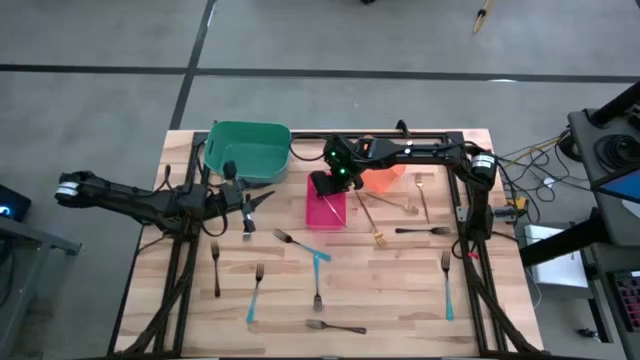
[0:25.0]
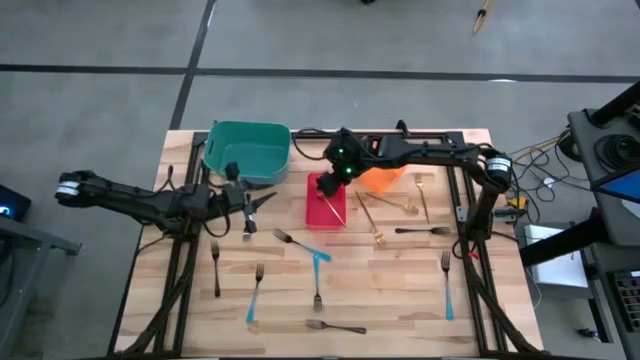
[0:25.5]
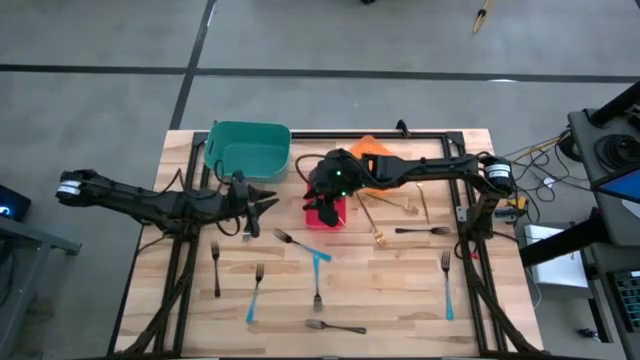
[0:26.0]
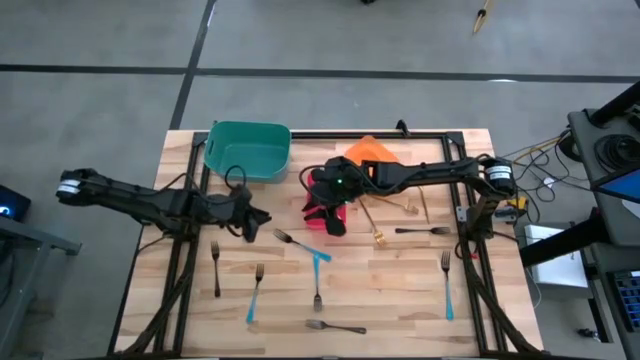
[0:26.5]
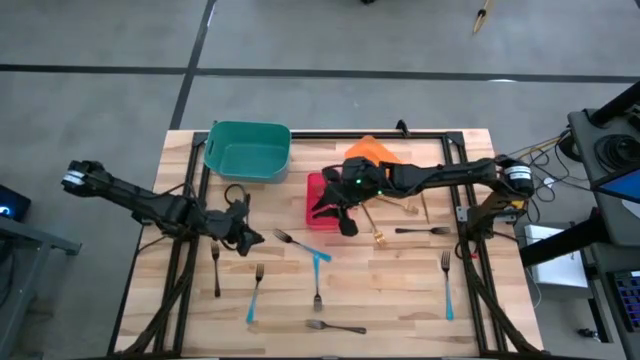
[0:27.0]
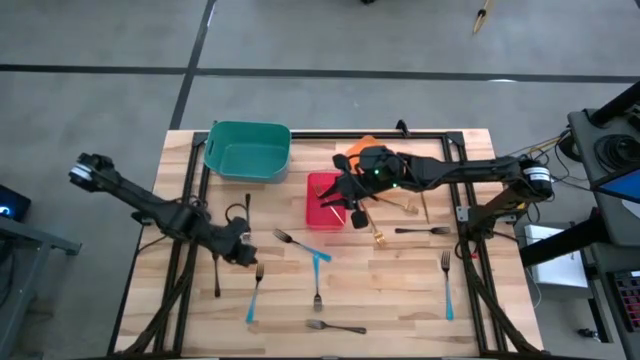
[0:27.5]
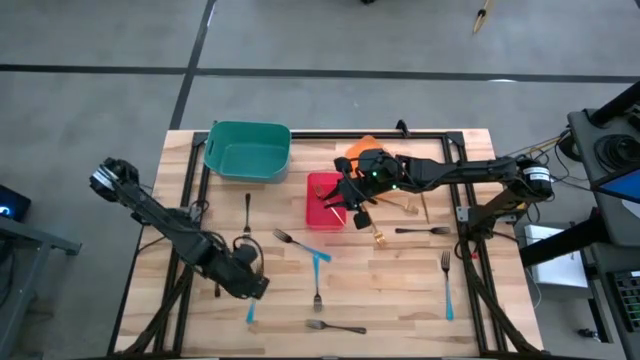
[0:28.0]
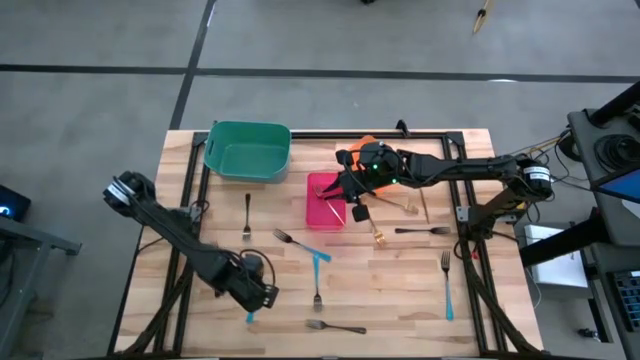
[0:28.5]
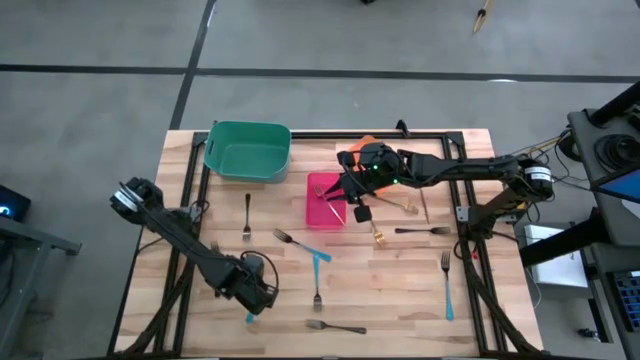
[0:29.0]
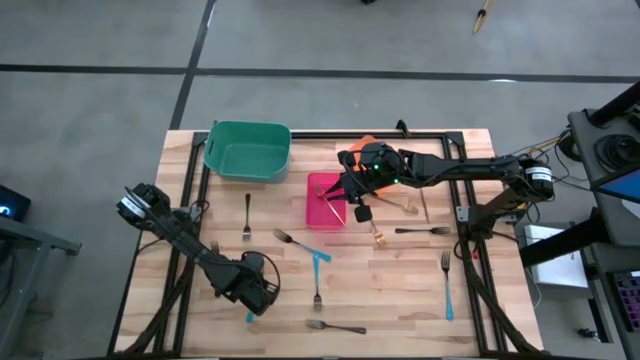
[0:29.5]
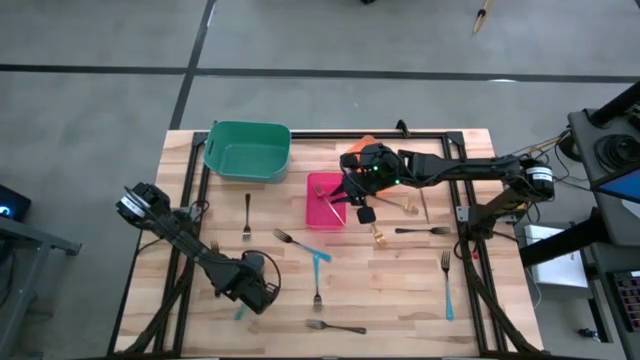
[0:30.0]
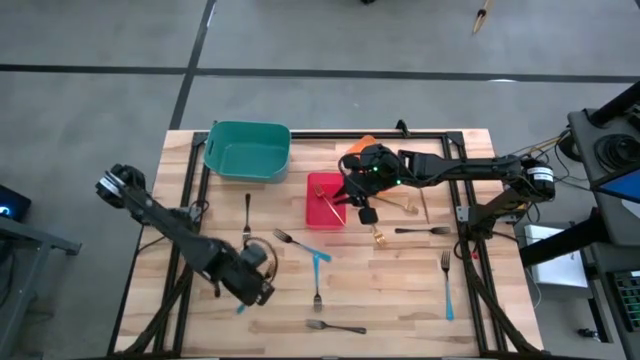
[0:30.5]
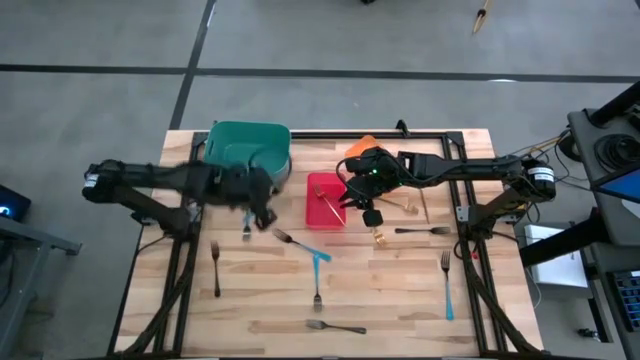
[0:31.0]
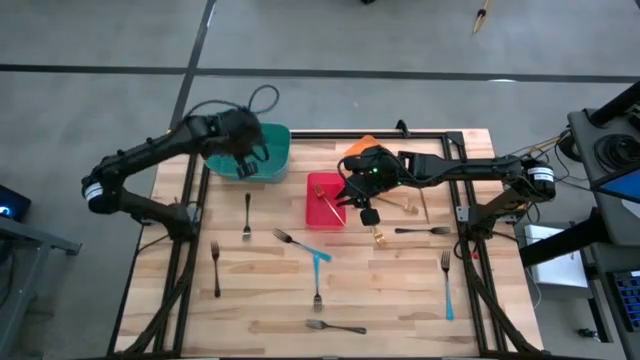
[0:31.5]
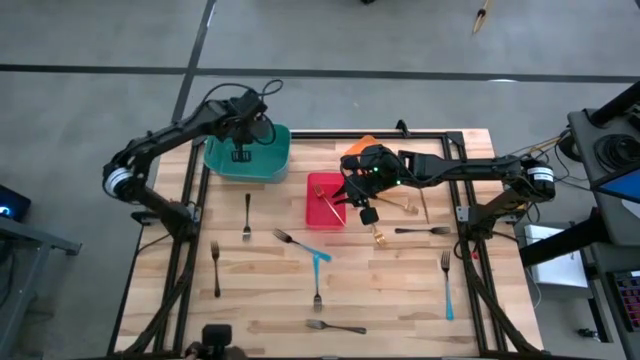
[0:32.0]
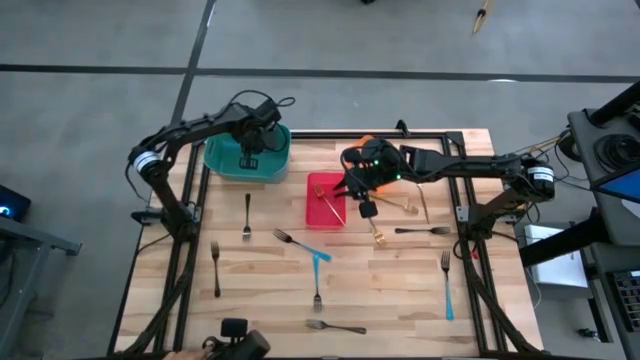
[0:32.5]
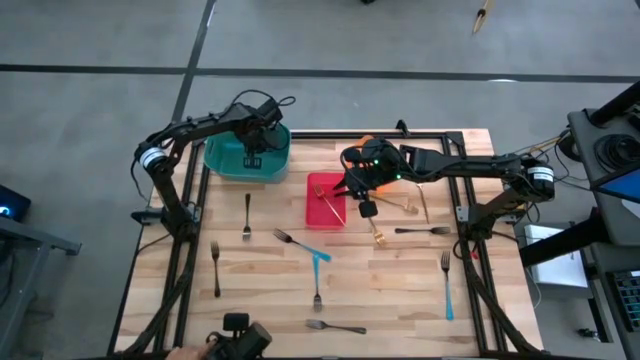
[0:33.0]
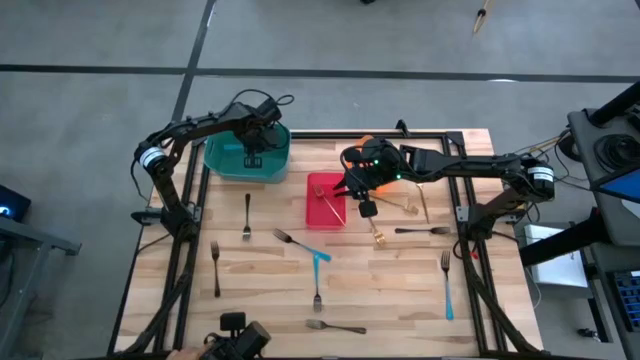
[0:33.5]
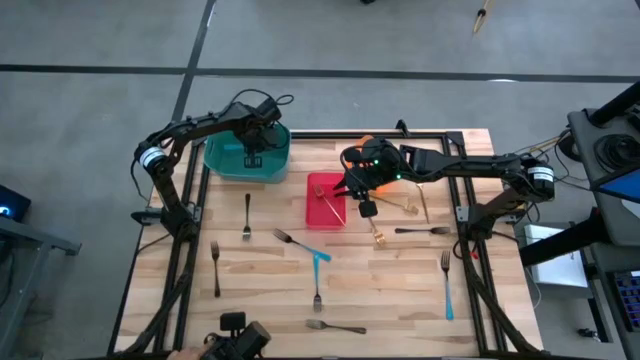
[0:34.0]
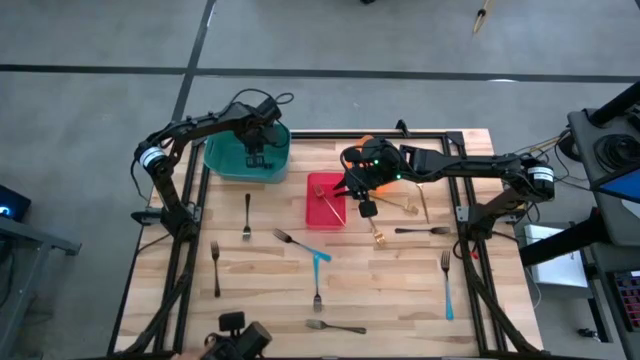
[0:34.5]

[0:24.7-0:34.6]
Task: Sort silverware by color (type)
Put the blue fork into the green bin

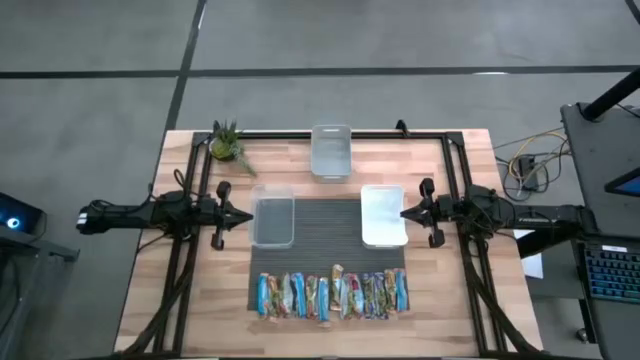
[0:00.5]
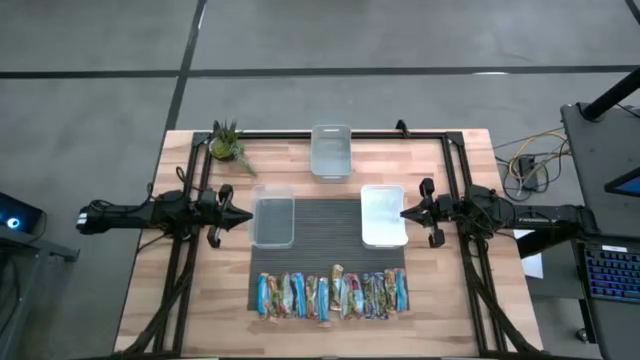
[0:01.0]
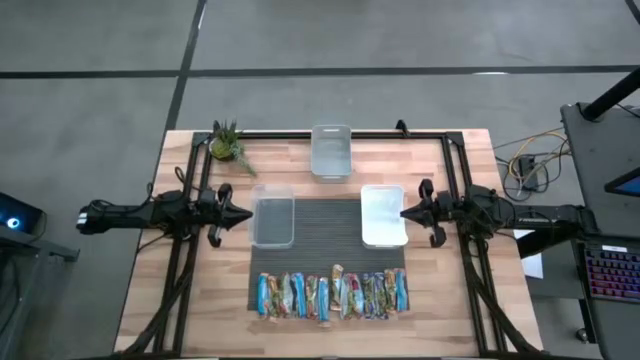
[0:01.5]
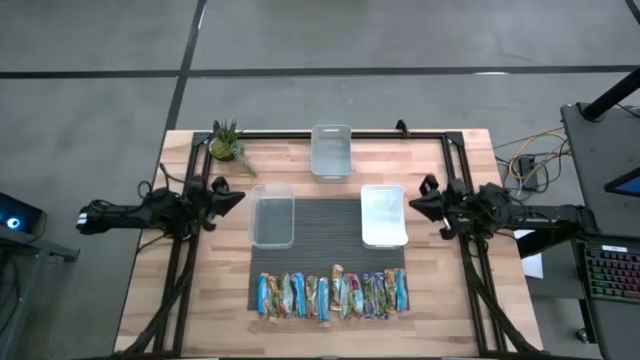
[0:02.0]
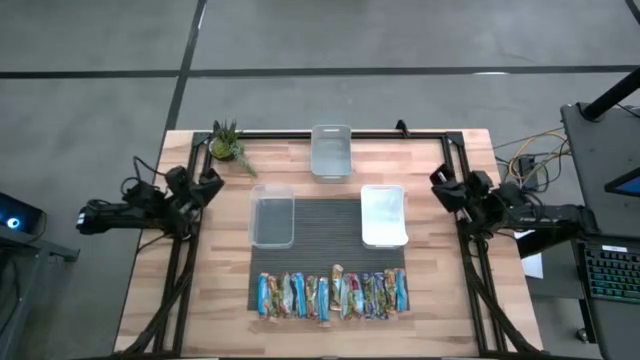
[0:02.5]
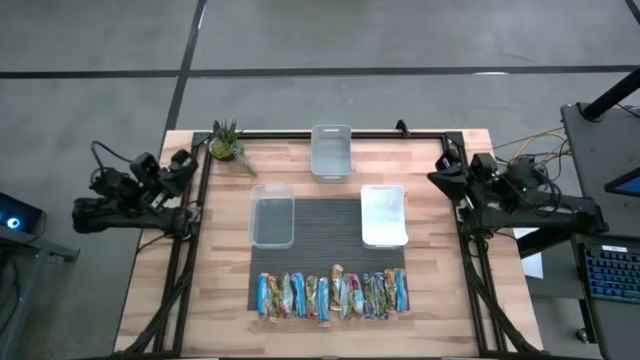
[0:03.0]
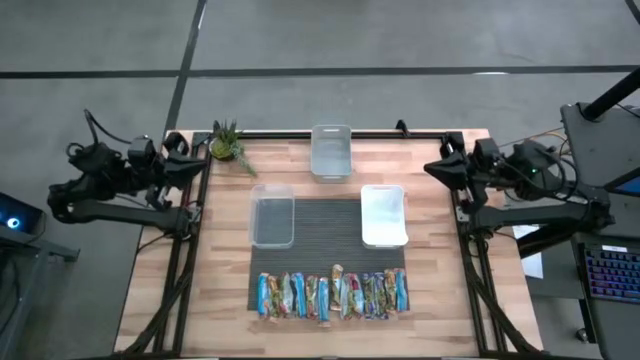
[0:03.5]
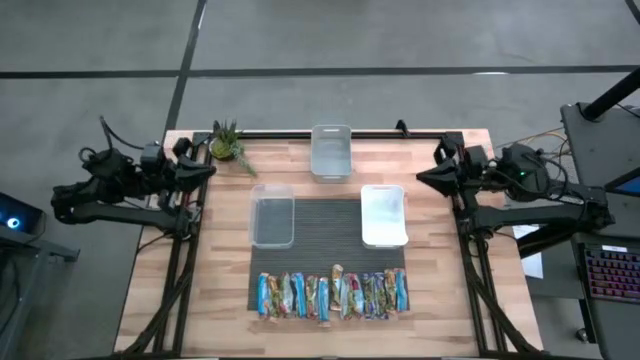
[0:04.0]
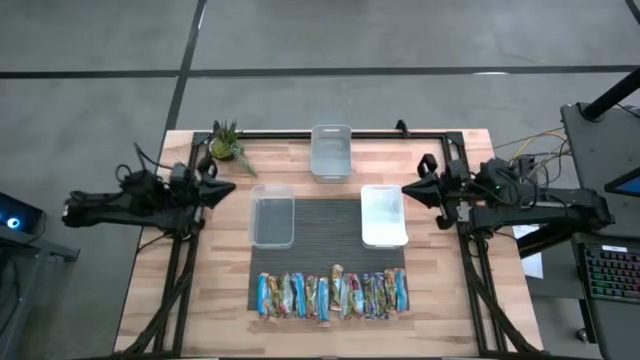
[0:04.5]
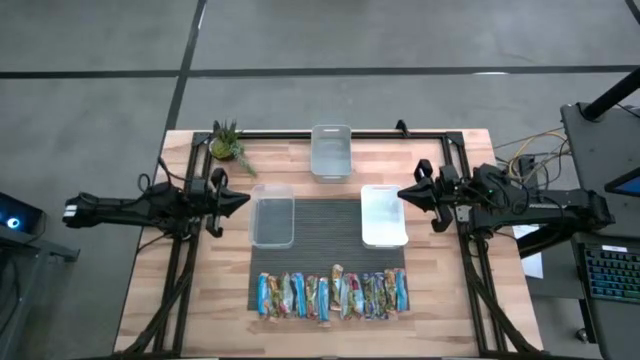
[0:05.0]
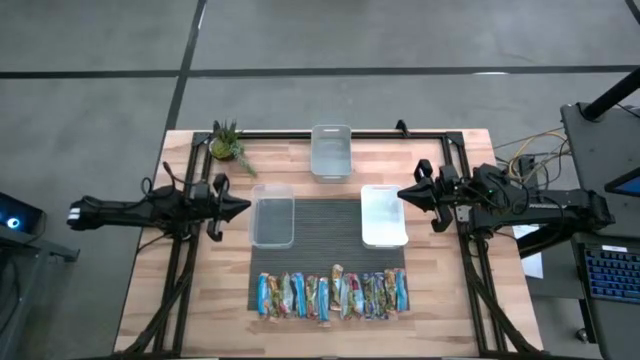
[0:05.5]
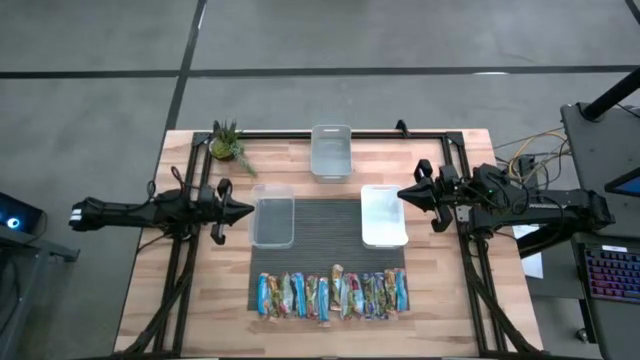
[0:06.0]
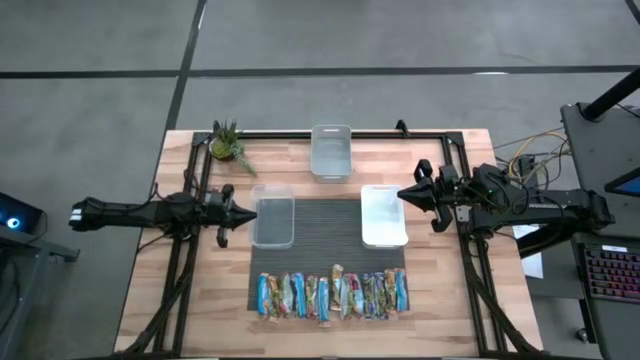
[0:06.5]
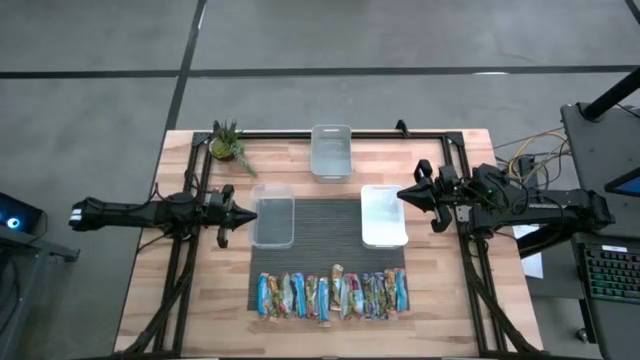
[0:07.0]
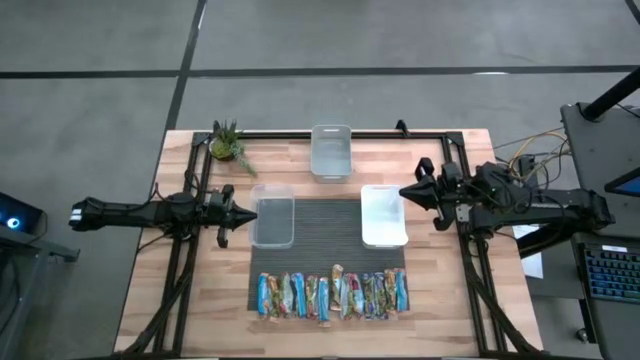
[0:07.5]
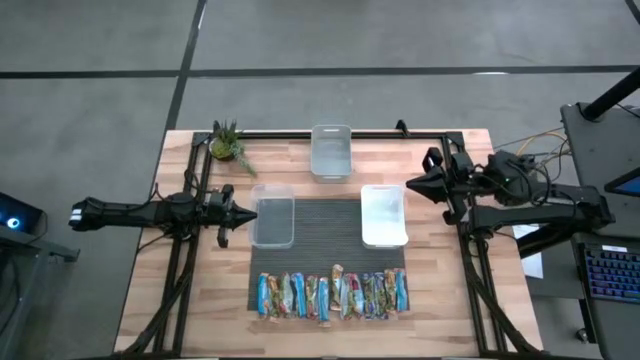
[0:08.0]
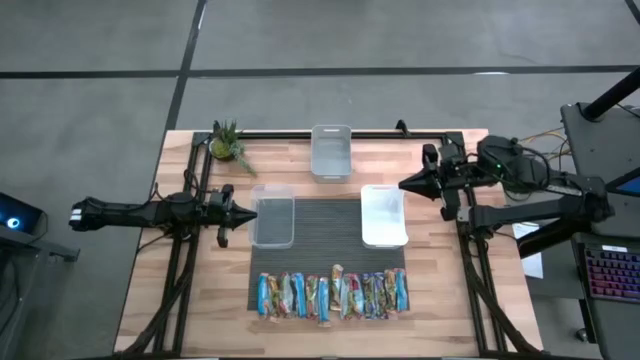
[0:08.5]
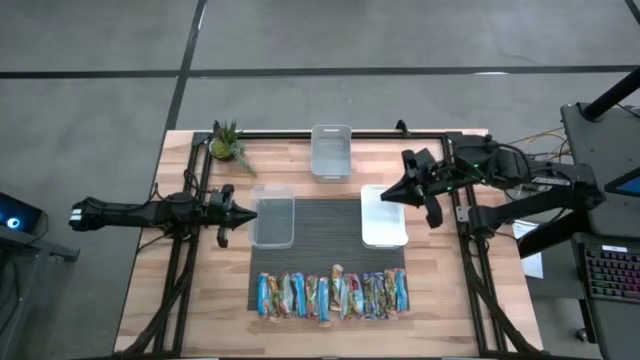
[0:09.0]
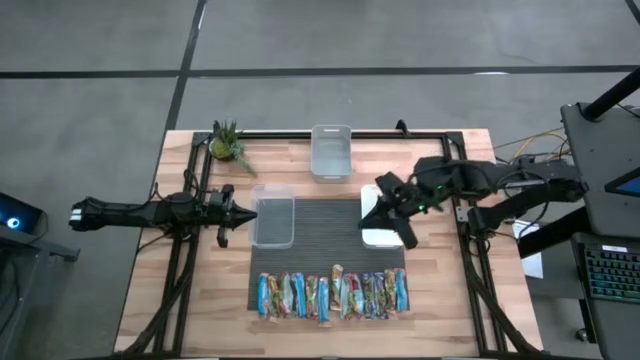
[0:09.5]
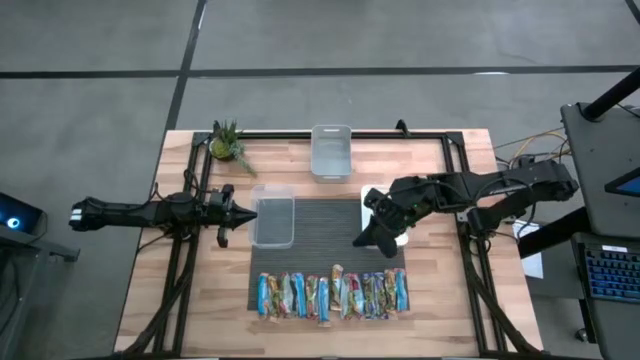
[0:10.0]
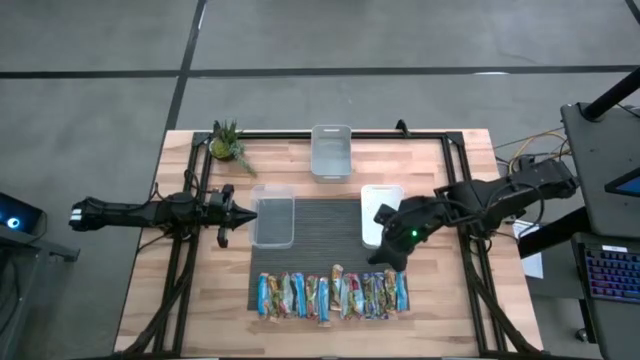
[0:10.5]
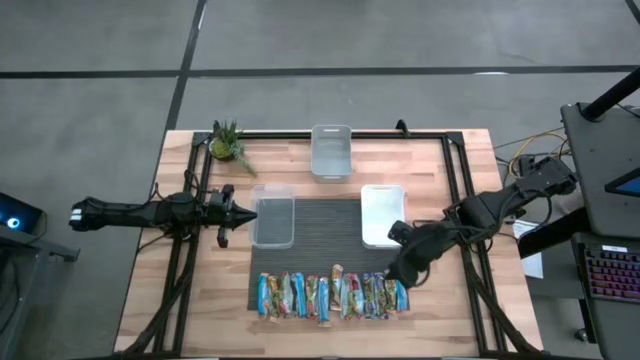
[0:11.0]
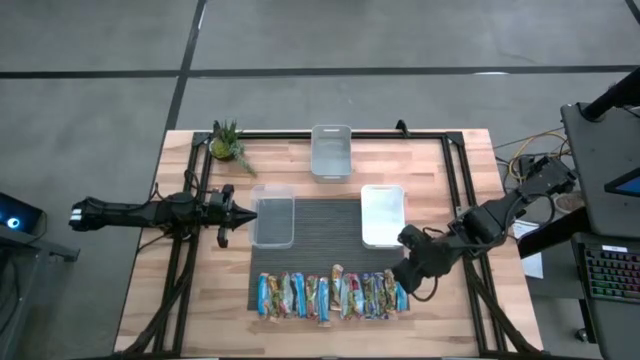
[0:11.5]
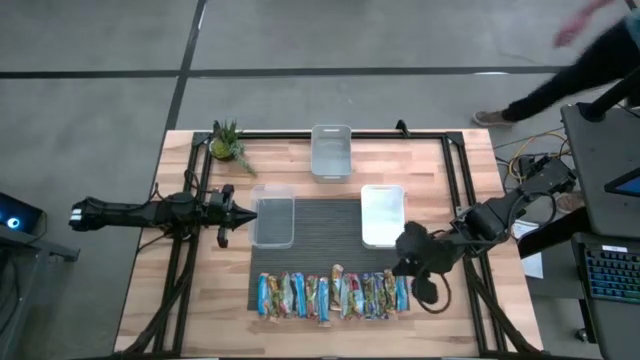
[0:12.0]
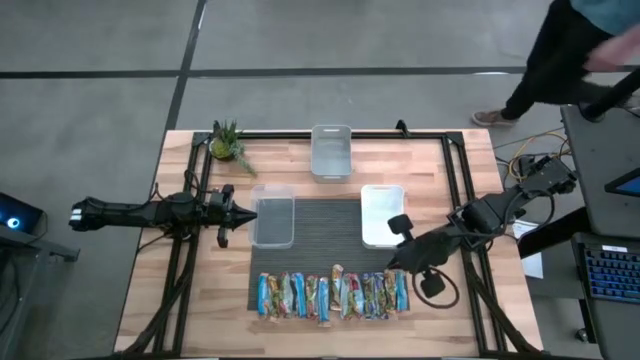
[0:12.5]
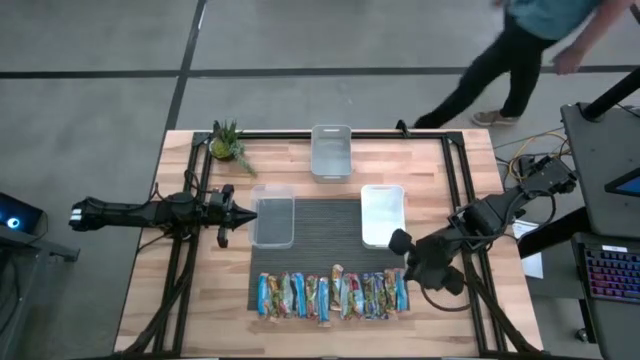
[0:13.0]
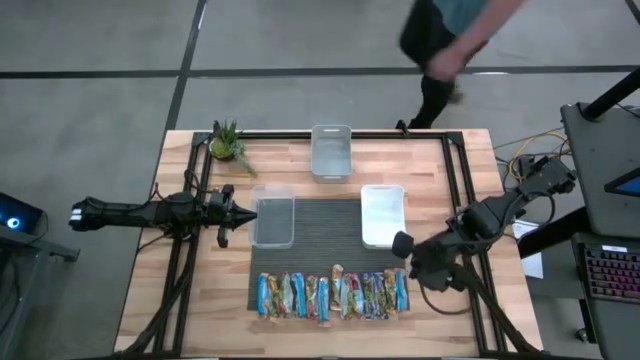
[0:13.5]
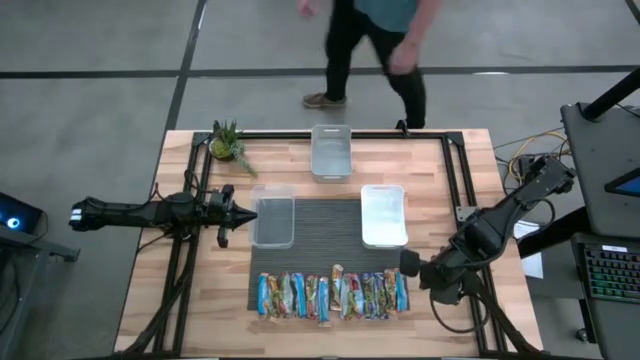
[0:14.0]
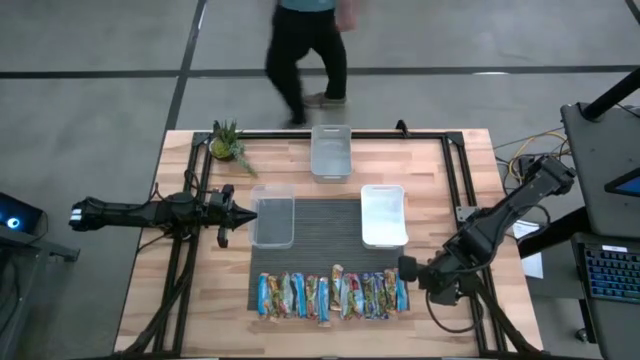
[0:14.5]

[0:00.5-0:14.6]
Task: Pick and place Granola Bars by type
Put the red granola bar into the transparent bin
